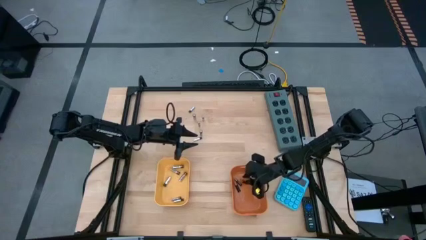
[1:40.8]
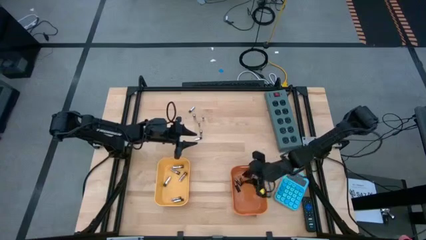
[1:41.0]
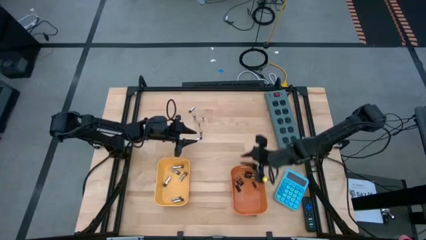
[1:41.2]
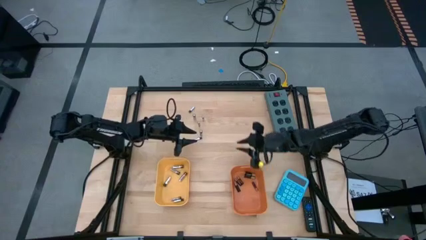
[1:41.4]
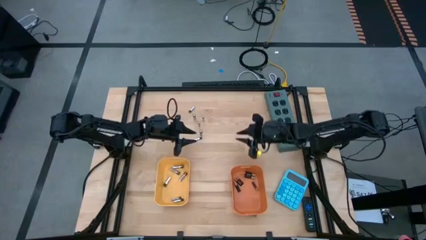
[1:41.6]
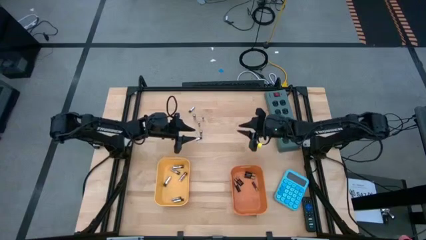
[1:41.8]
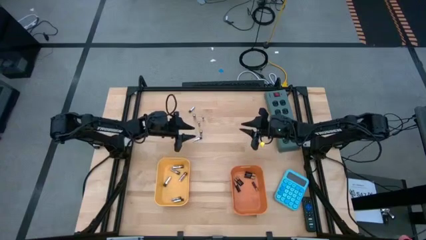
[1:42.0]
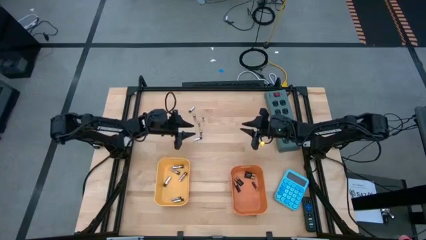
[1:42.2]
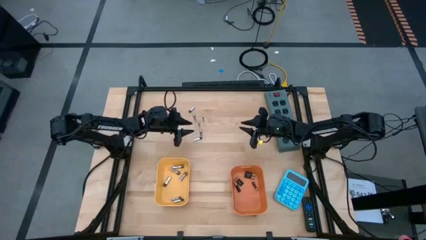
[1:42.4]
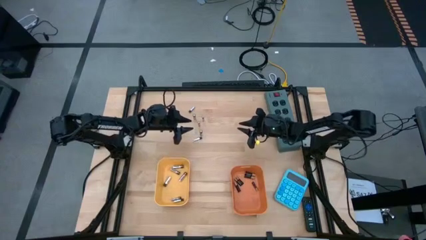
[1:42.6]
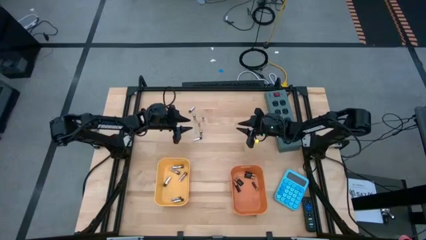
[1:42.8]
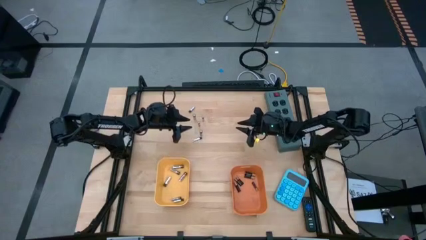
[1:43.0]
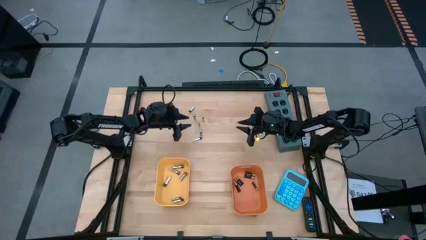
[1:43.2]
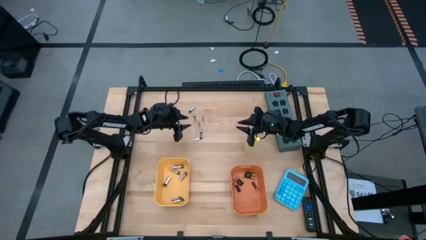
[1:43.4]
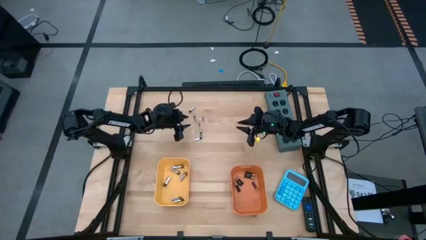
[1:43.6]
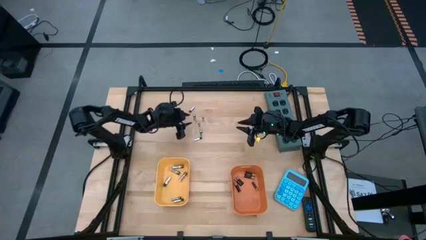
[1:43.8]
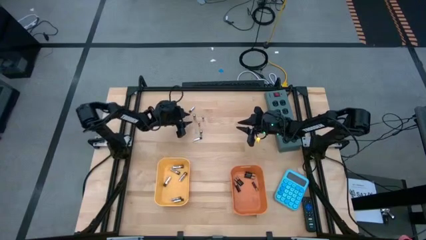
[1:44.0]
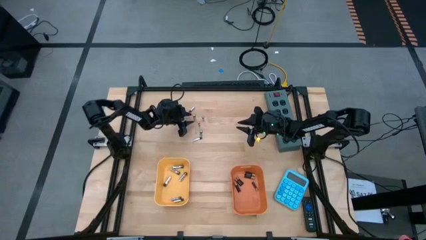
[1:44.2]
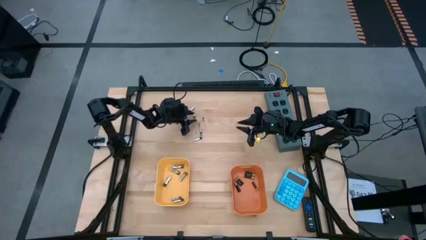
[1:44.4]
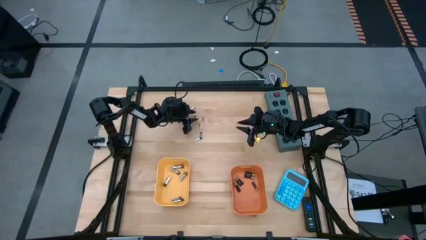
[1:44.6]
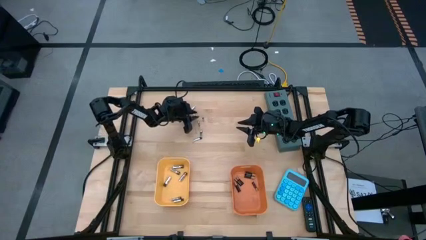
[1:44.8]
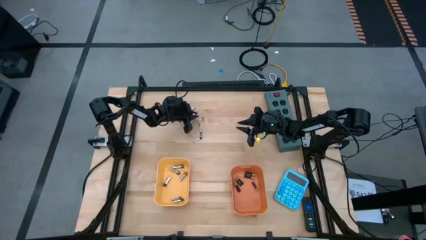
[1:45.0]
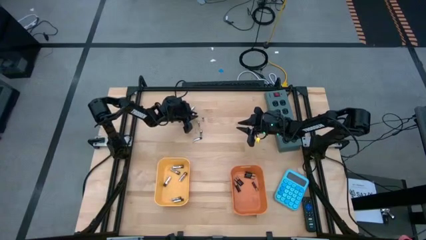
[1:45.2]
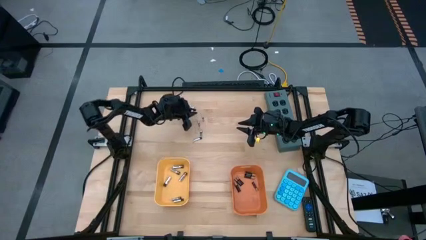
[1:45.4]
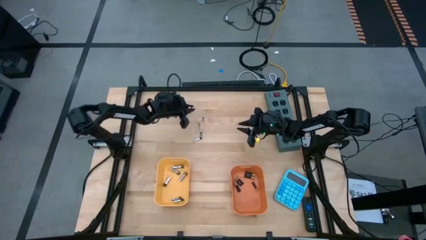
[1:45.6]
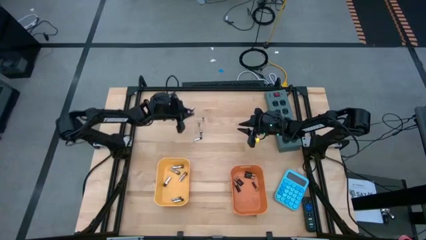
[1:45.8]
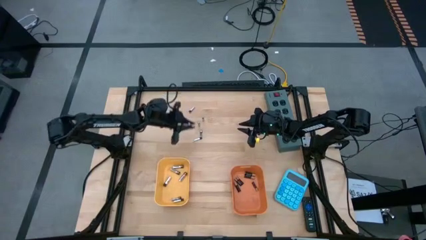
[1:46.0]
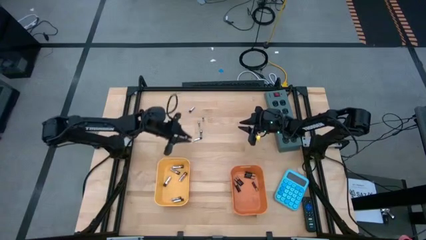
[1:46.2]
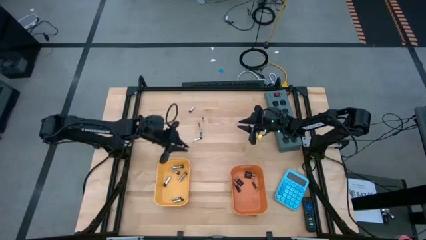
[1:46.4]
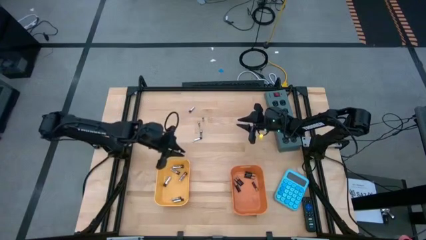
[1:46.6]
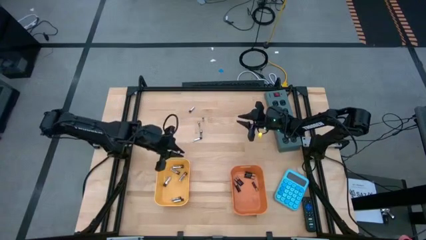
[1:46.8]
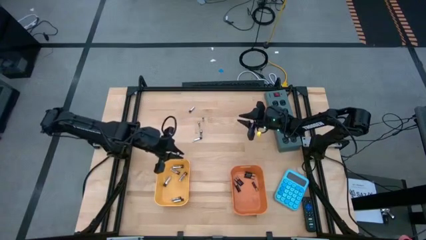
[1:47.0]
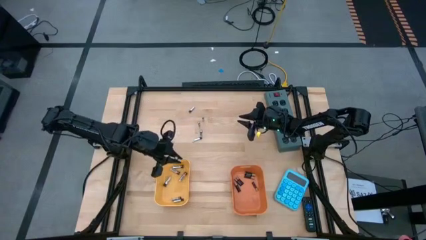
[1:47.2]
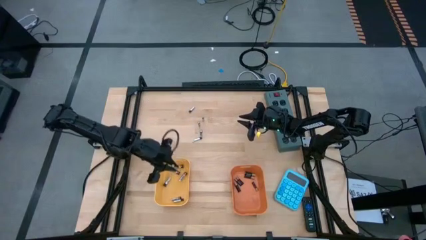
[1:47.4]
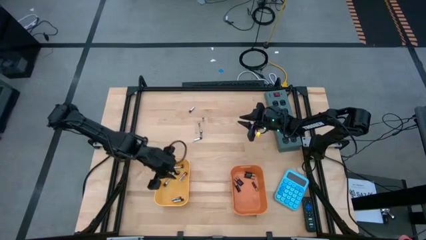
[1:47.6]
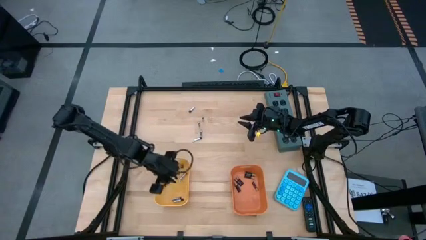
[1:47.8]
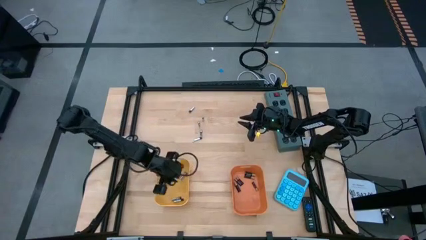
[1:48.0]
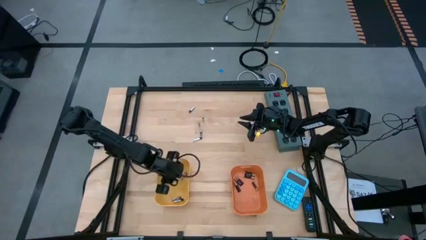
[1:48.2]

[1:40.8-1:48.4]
Task: Sort batteries
Put the silver battery into the yellow bin

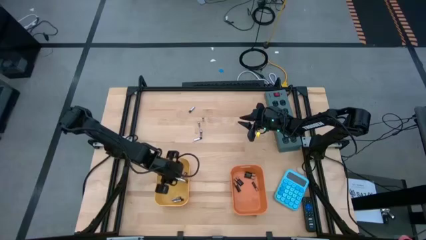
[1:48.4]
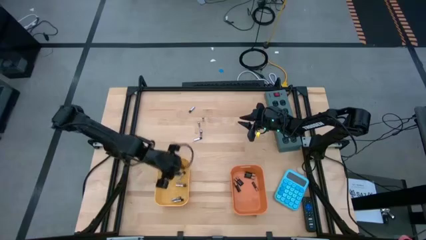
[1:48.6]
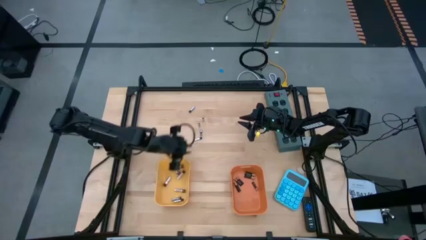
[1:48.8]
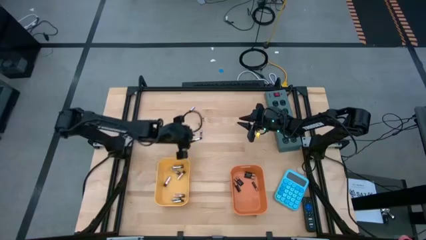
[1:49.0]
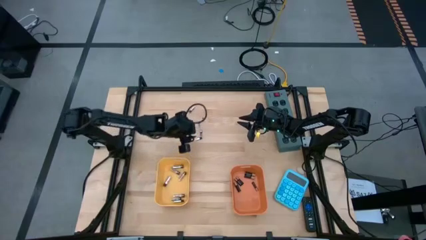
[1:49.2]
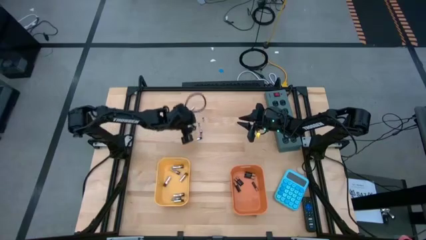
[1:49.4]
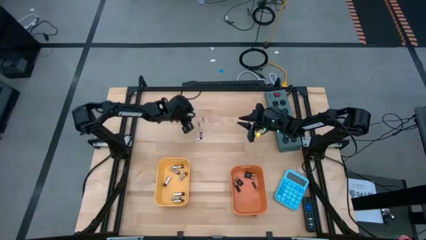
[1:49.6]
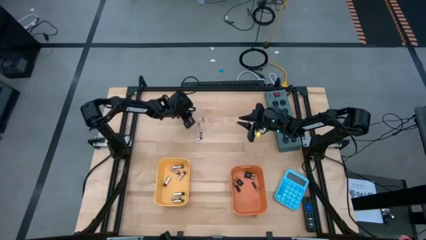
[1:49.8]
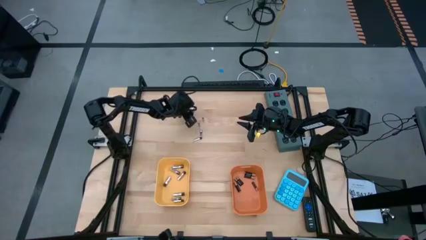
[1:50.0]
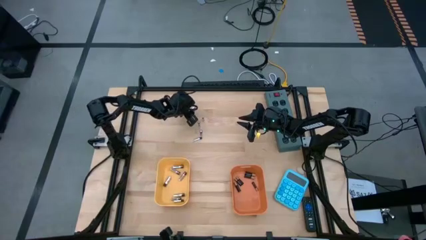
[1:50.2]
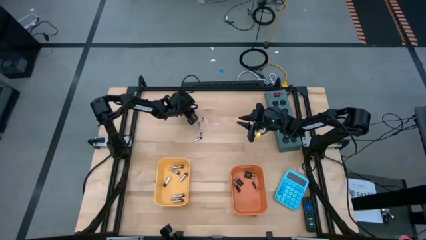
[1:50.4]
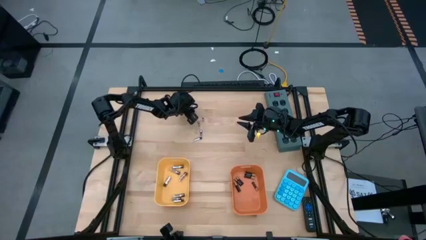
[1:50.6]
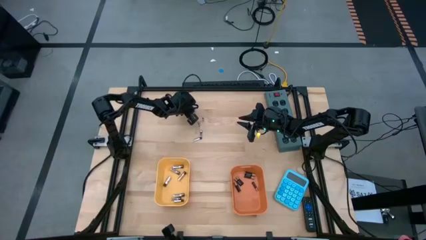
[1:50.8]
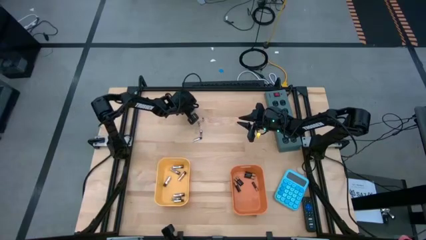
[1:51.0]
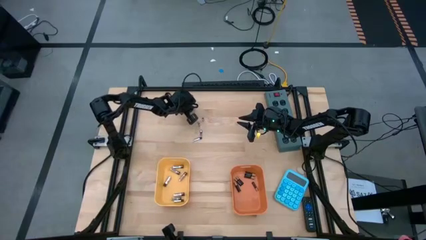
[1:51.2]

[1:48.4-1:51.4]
Put the silver battery into the yellow bin

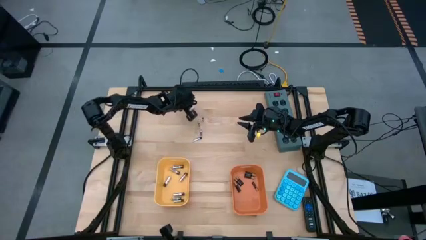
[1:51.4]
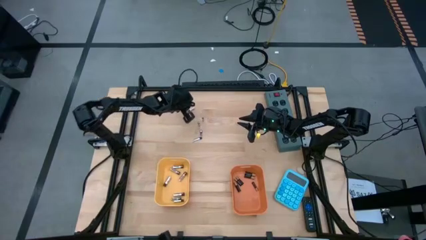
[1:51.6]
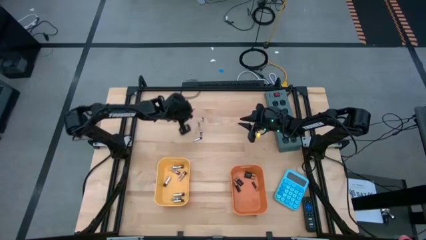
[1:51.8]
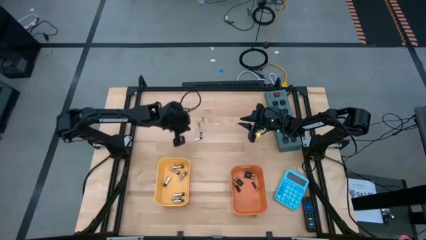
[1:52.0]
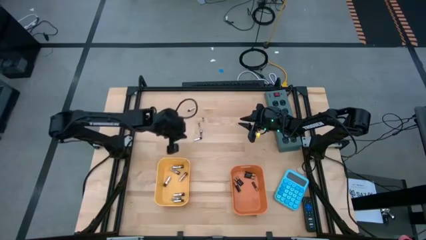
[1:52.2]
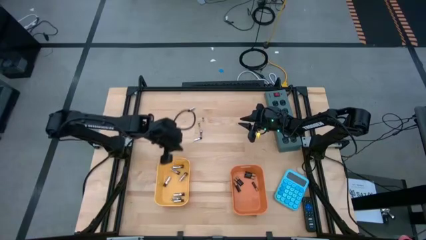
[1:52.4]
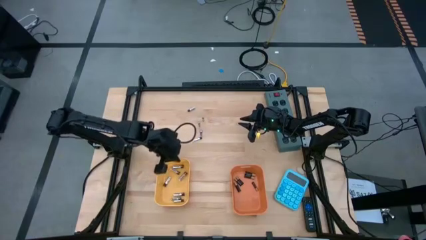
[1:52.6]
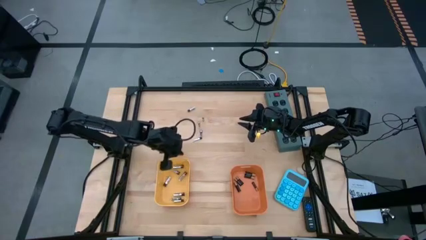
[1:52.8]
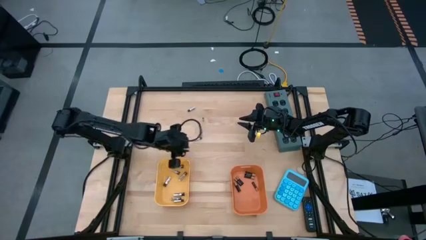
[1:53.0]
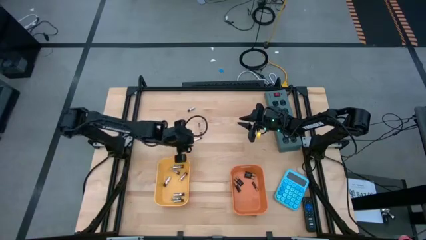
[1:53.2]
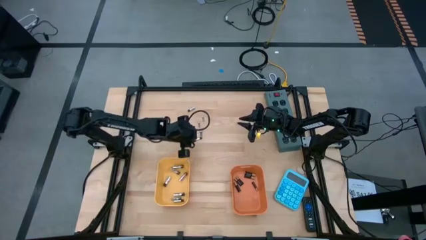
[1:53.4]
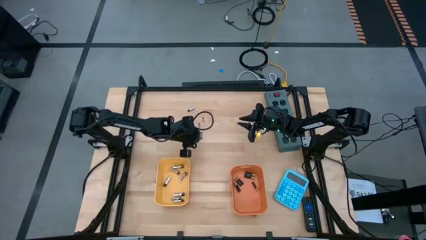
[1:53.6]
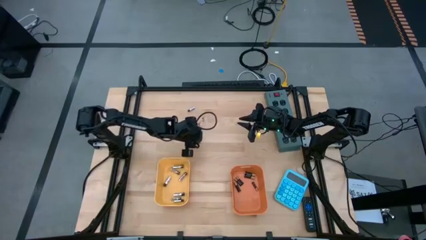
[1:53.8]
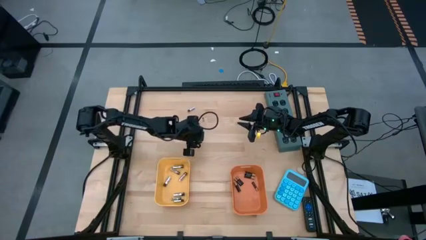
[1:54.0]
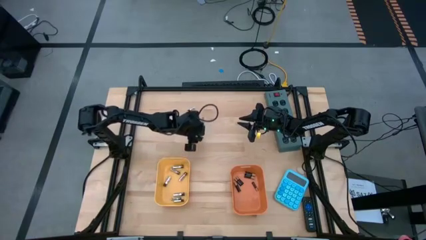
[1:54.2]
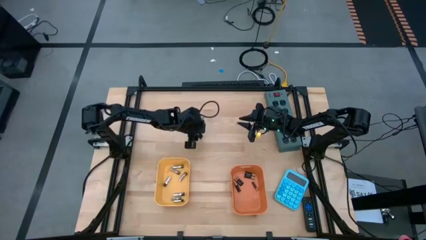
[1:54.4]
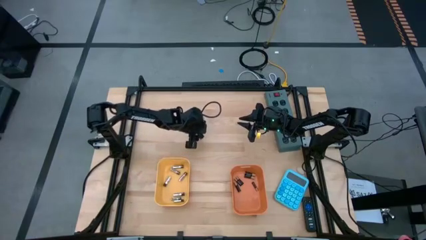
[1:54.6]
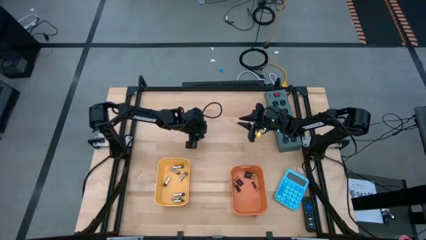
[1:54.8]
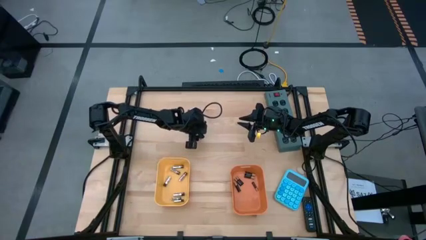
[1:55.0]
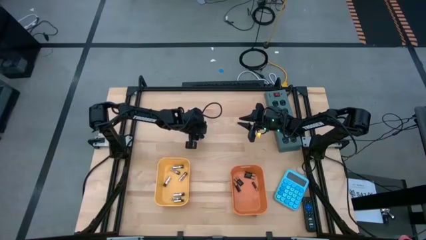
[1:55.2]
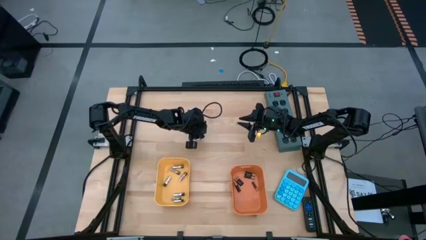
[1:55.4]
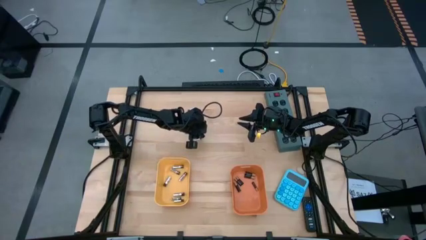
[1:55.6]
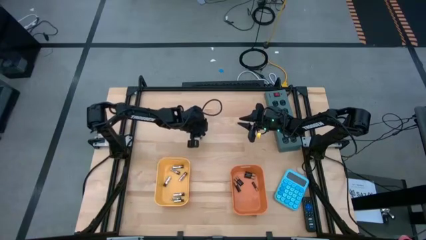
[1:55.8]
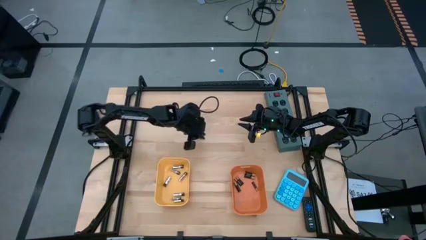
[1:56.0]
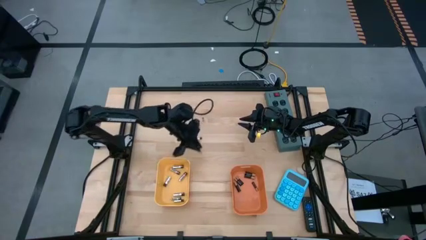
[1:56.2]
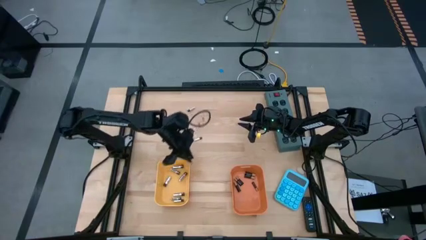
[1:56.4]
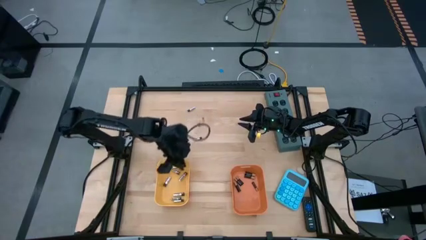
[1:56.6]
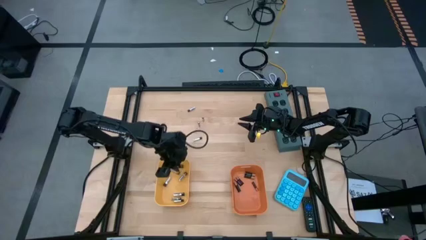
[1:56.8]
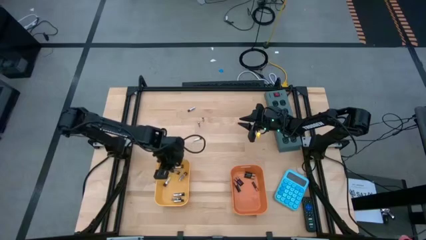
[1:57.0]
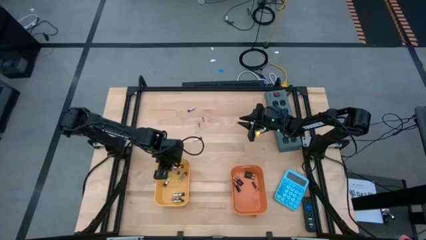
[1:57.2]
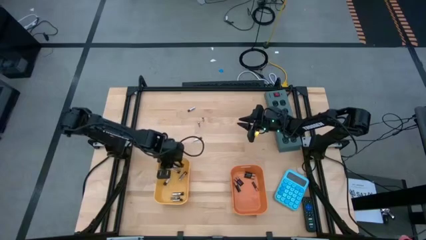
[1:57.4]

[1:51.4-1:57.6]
Put the silver battery into the yellow bin
